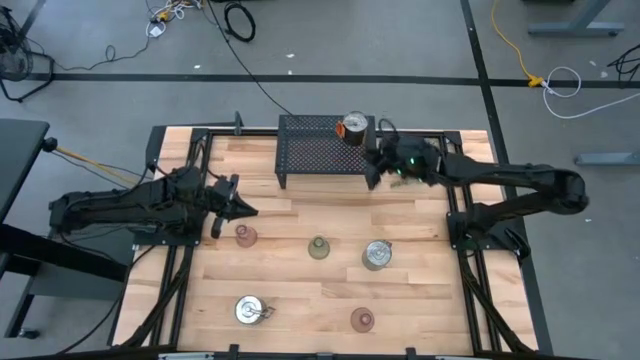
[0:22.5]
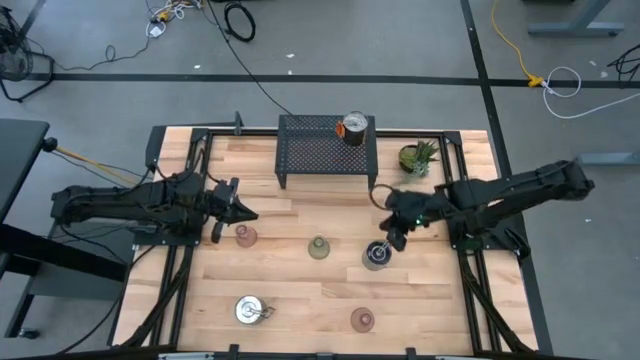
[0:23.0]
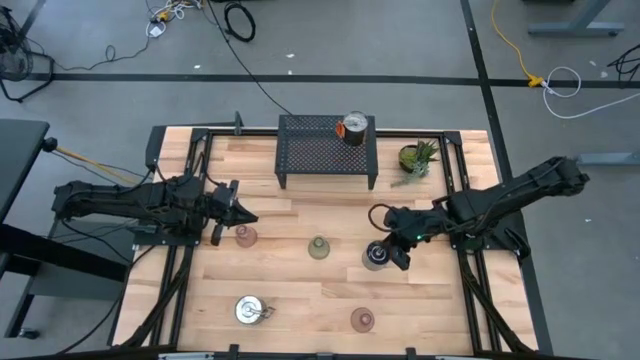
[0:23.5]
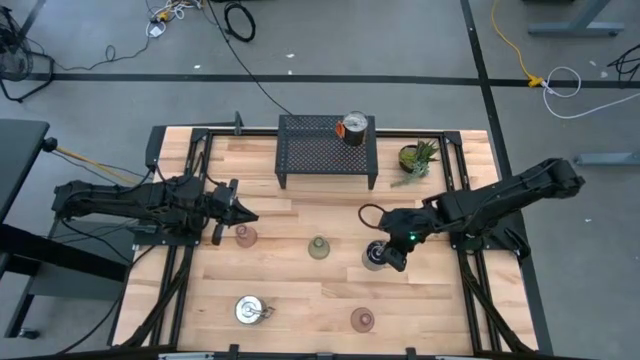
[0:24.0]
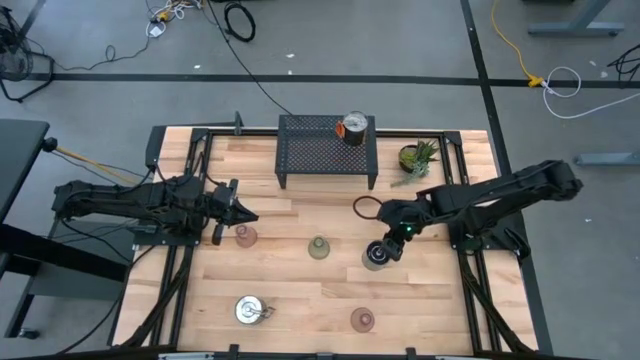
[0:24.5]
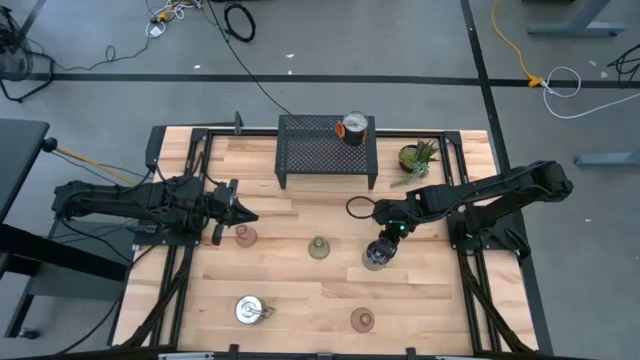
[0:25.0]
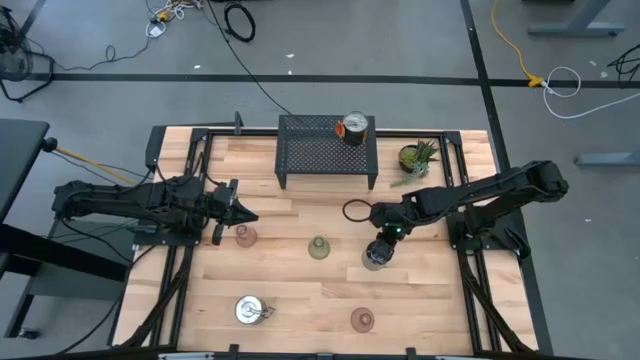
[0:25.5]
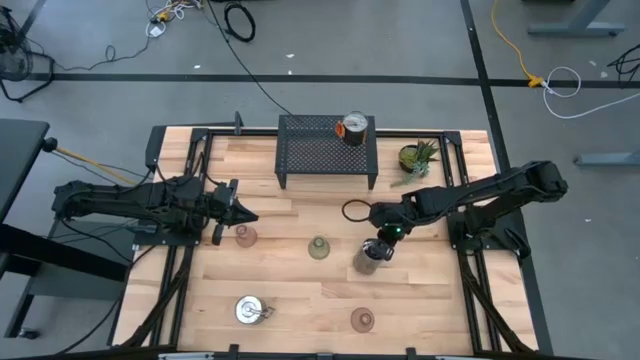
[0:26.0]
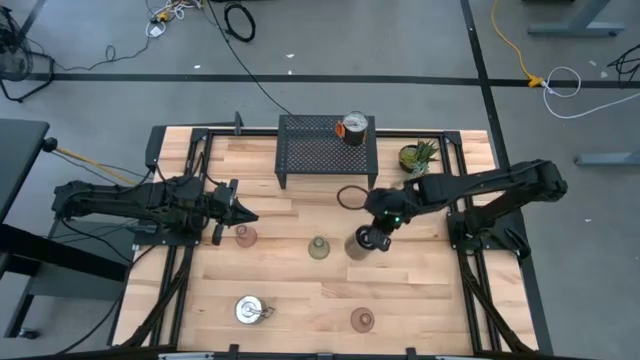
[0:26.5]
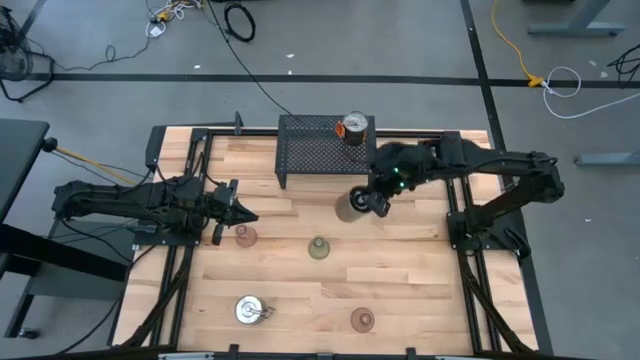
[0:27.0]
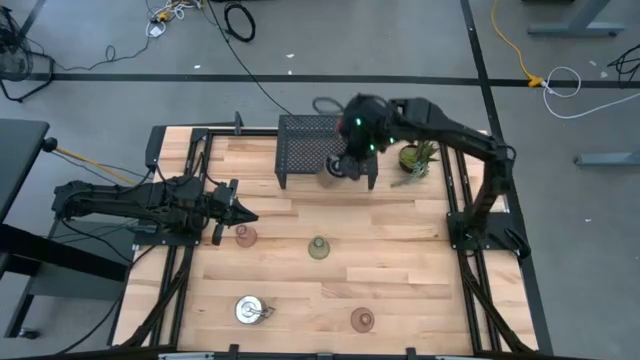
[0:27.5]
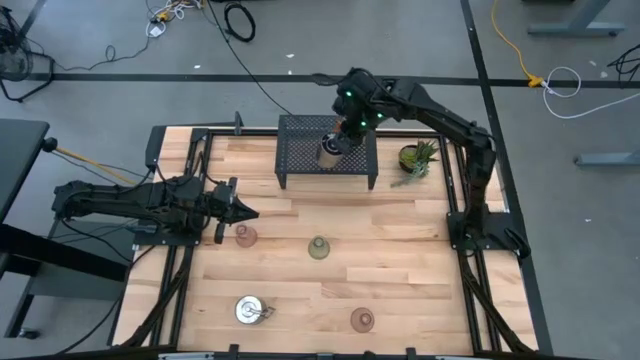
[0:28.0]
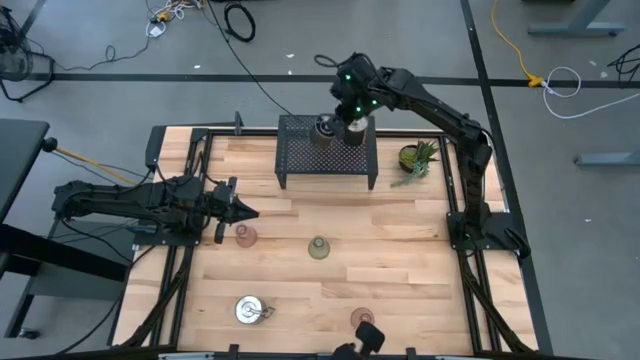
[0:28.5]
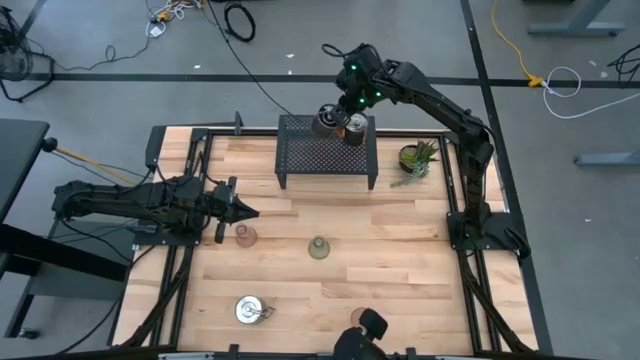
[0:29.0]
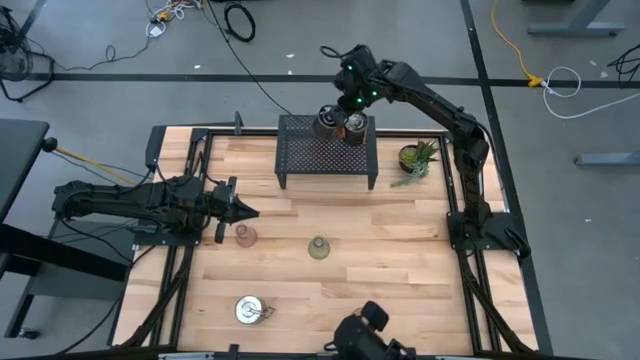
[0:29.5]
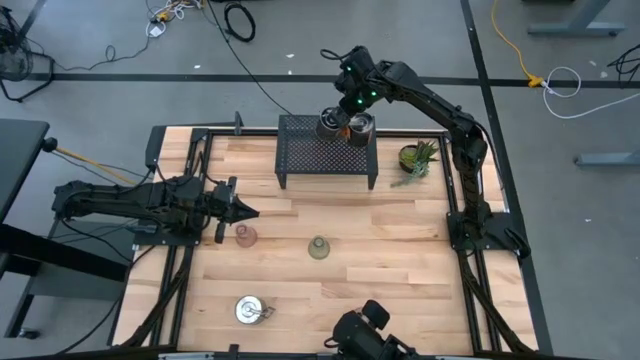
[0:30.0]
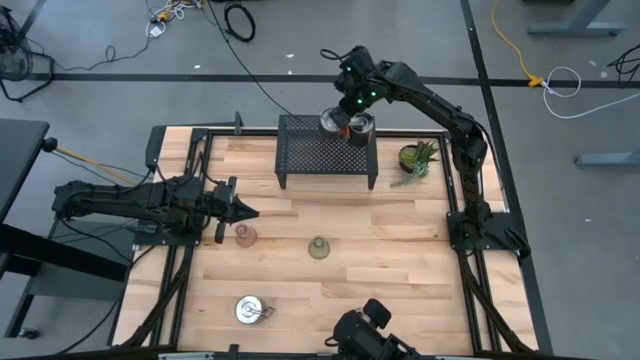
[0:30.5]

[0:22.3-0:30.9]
Task: Pick & Place candle stick holders
Put the top scented candle on the shelf aligned with the other silver scented candle

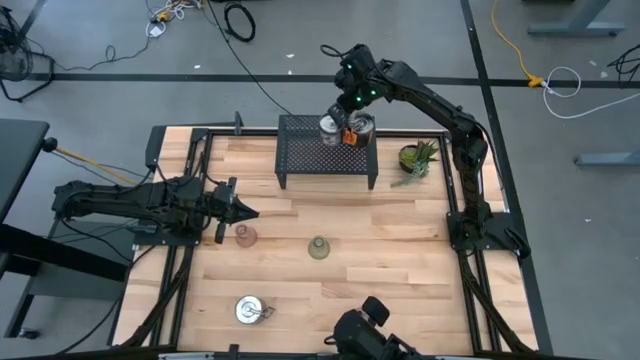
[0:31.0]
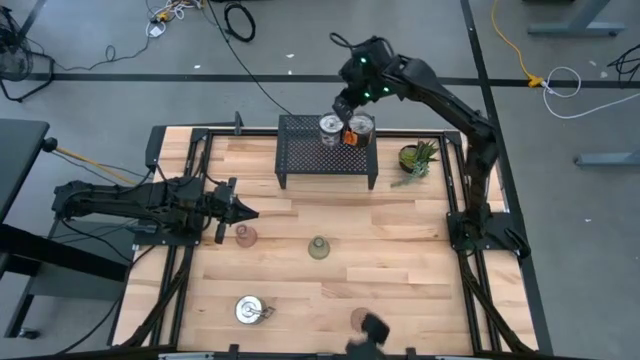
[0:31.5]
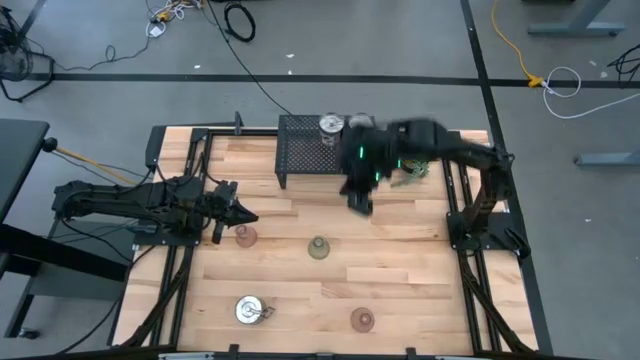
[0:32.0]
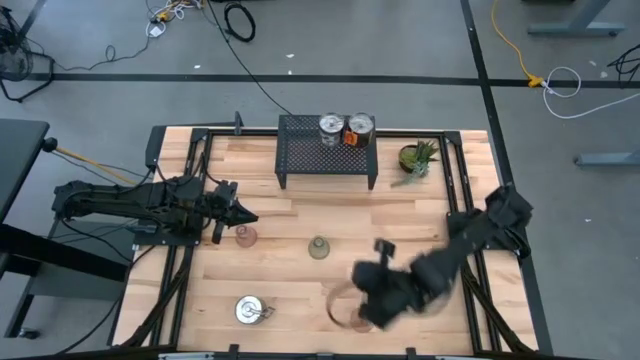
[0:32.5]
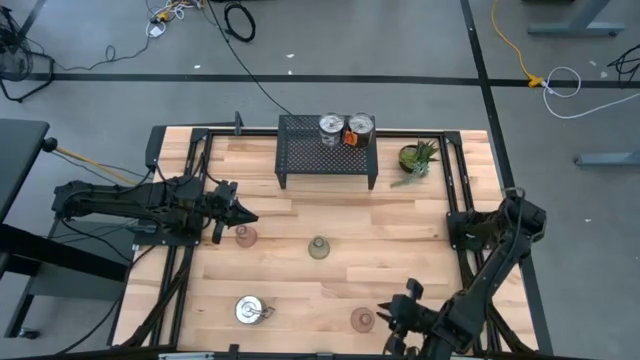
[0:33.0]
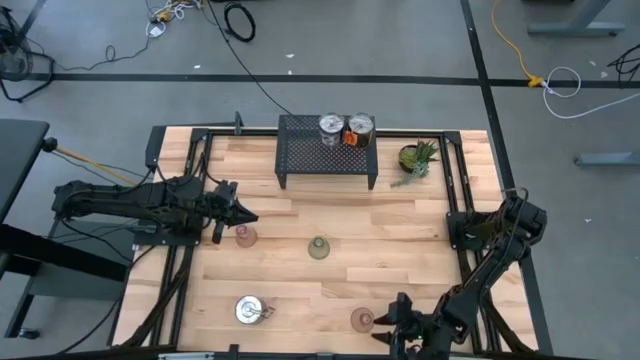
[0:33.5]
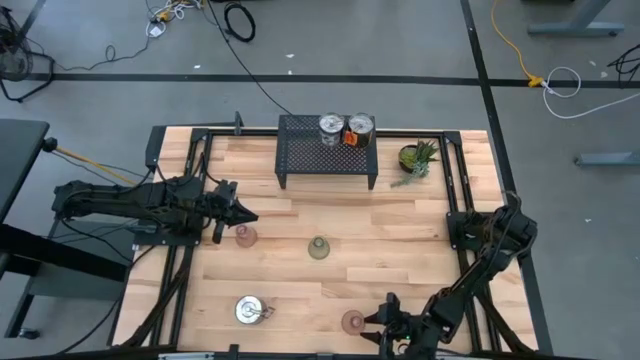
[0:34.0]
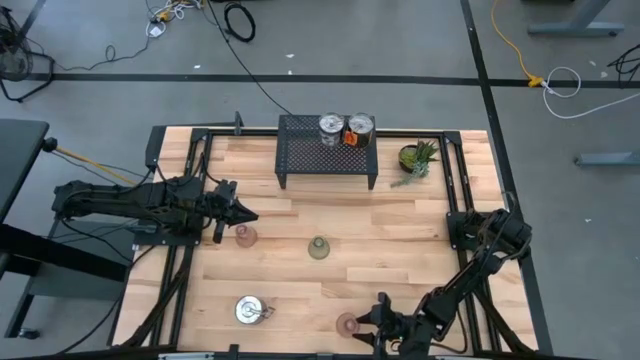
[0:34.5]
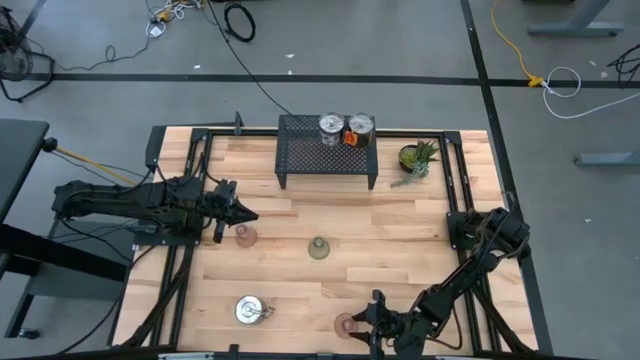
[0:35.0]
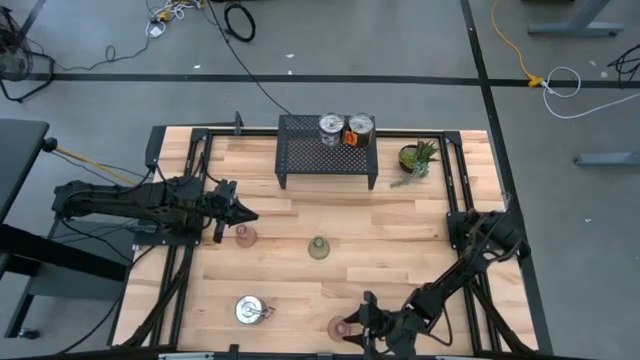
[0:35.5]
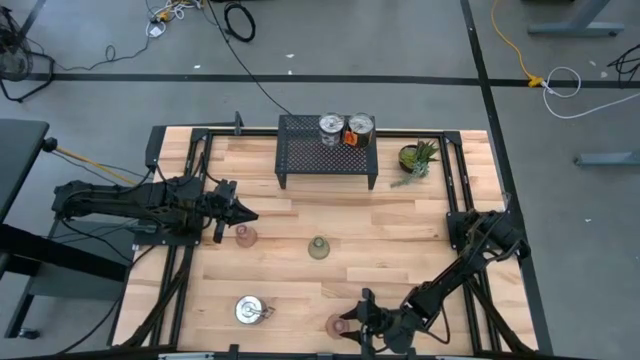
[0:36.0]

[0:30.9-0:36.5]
Put the bottom pink candle holder on the shelf

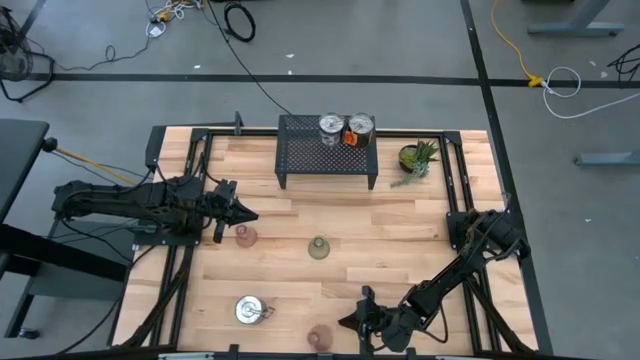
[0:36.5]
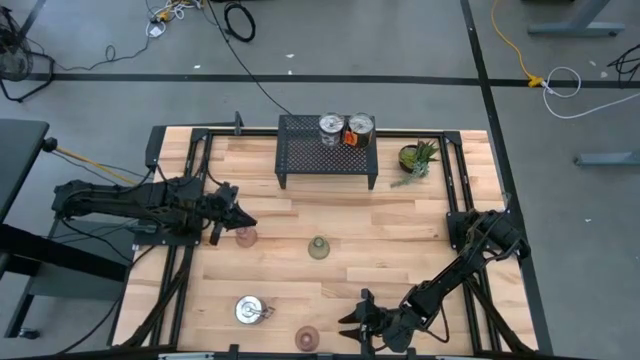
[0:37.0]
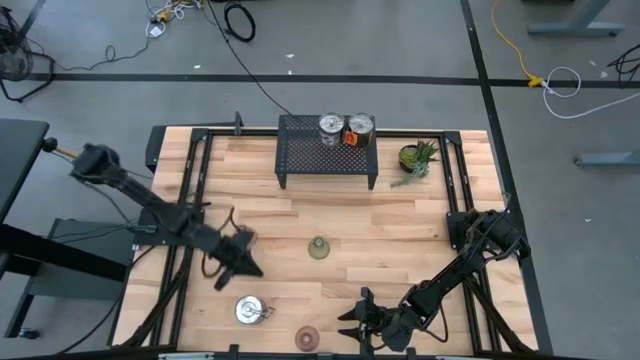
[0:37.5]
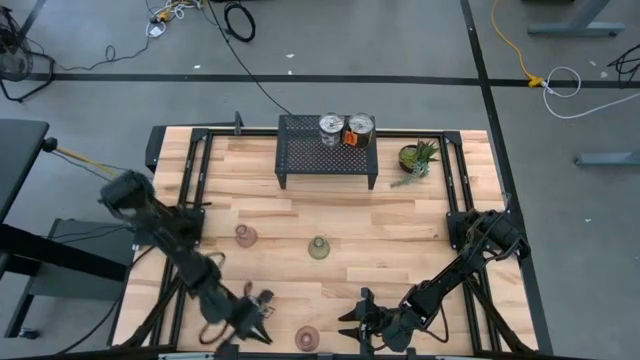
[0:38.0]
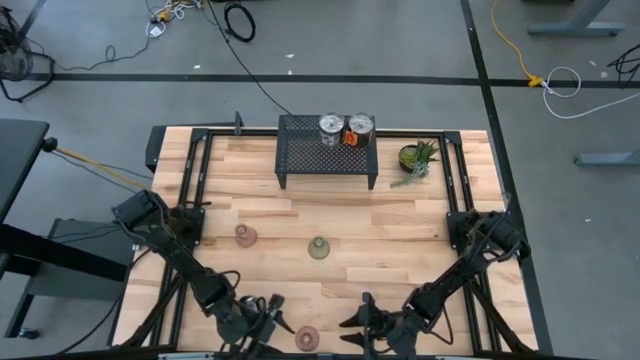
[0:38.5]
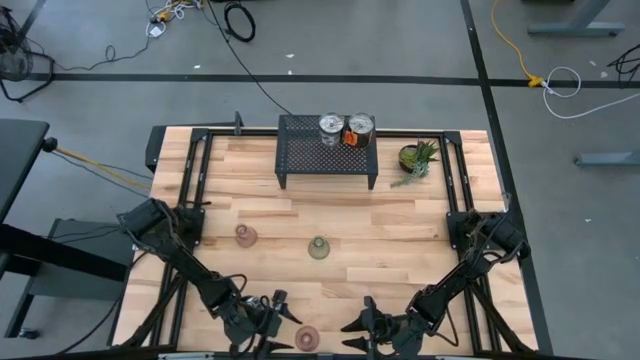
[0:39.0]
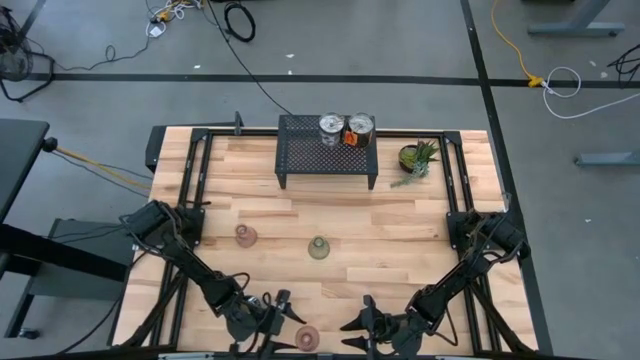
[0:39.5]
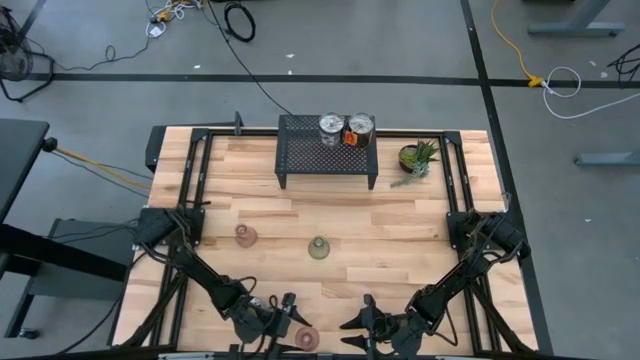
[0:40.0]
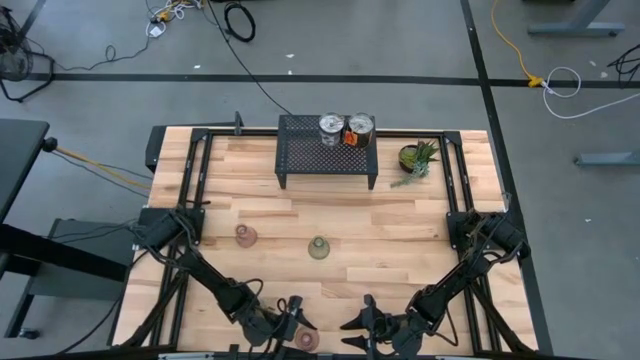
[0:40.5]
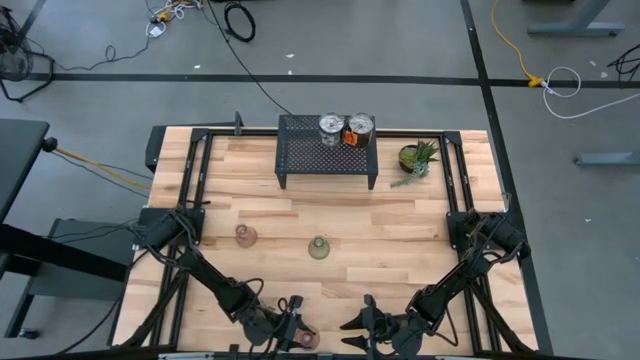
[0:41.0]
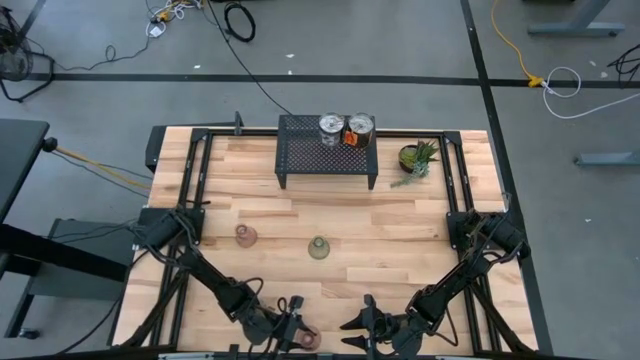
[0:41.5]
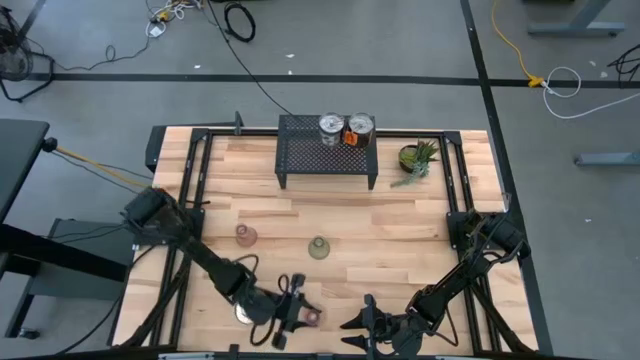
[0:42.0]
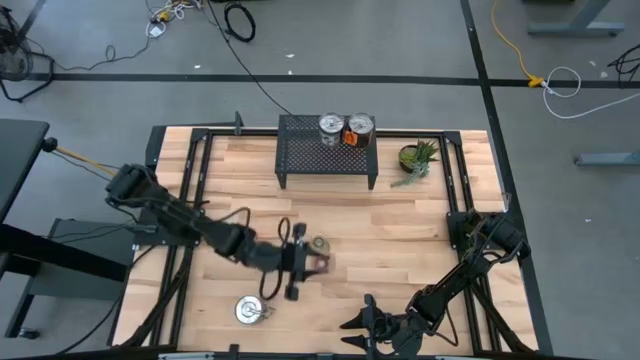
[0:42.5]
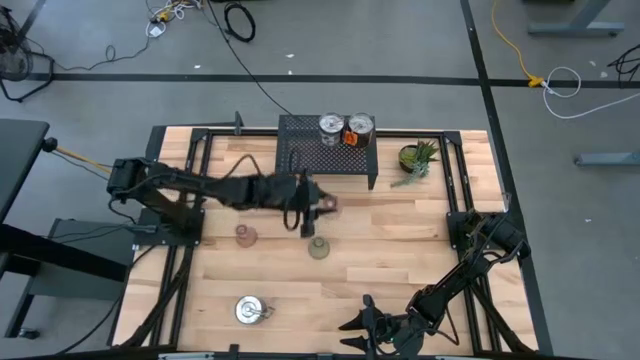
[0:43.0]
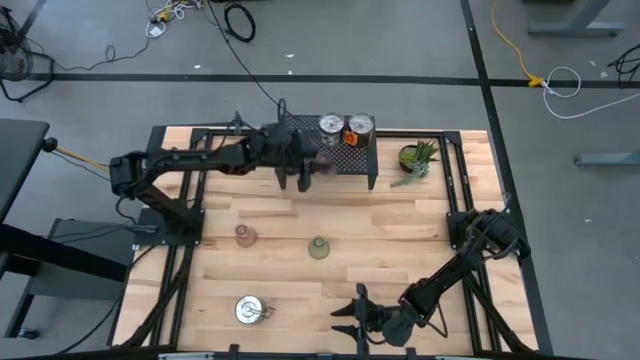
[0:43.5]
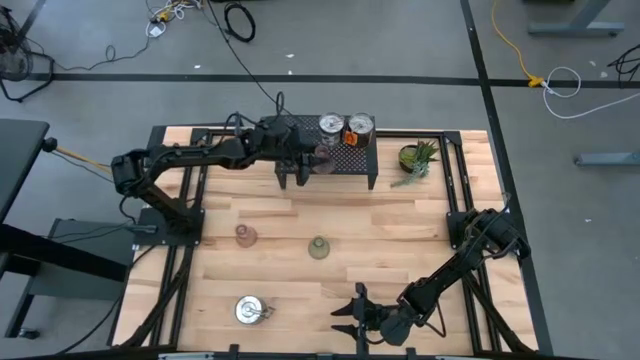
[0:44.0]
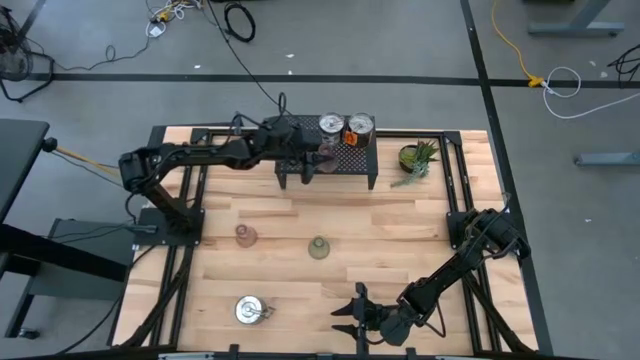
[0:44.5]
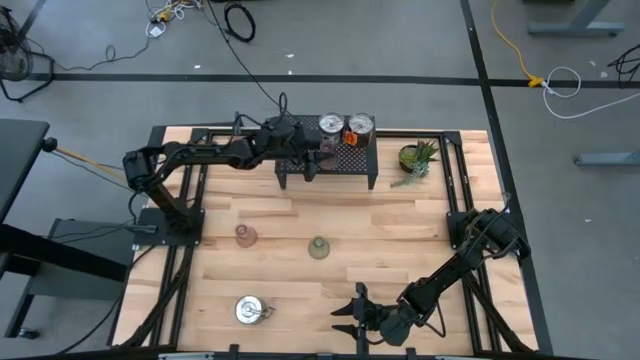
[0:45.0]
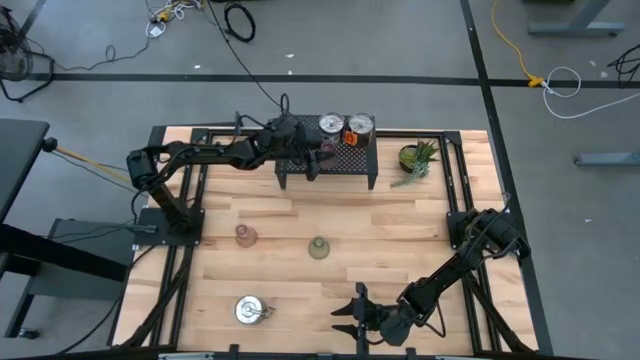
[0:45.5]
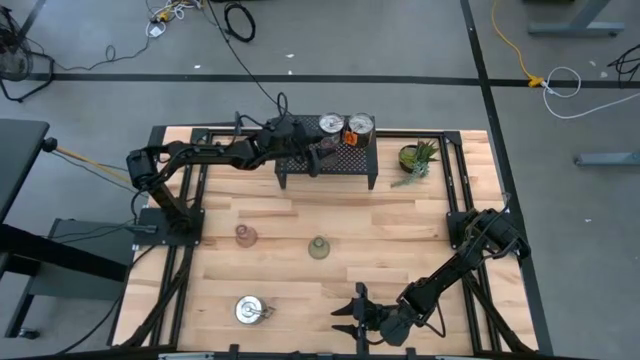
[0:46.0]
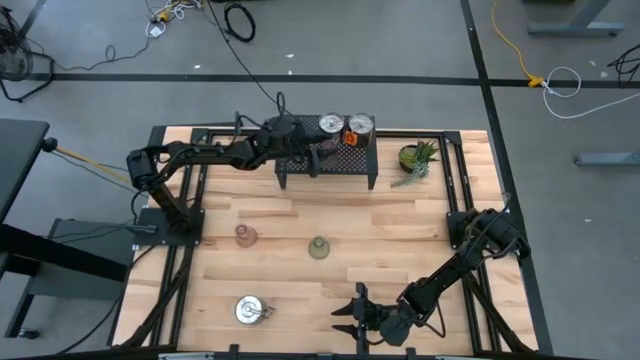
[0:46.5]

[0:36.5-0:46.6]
Put the bottom pink candle holder on the shelf
